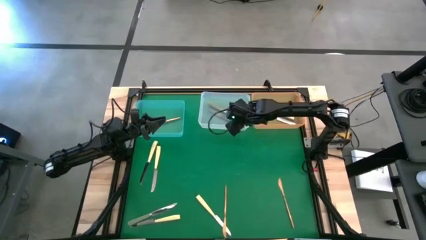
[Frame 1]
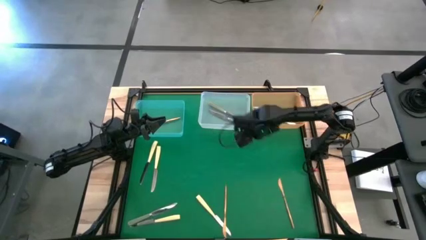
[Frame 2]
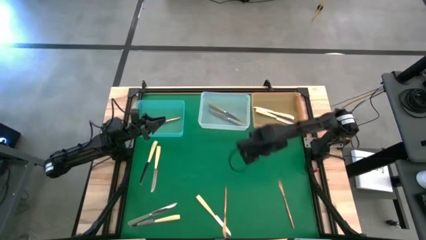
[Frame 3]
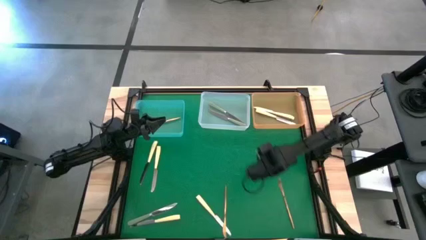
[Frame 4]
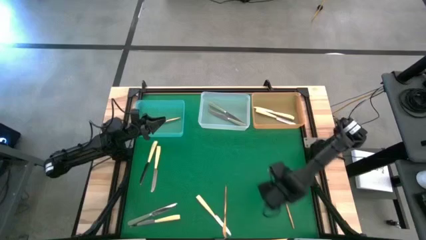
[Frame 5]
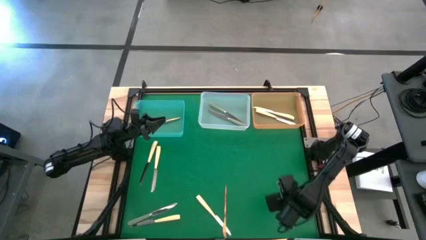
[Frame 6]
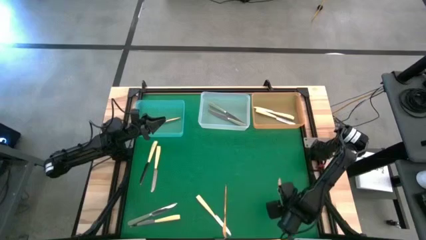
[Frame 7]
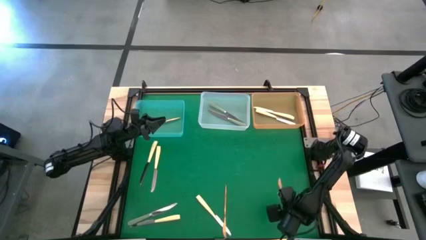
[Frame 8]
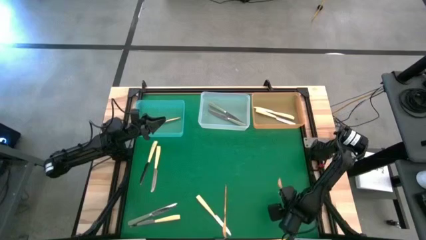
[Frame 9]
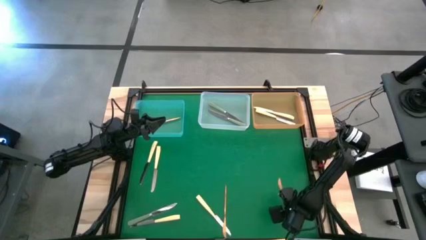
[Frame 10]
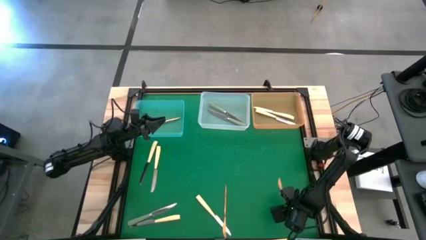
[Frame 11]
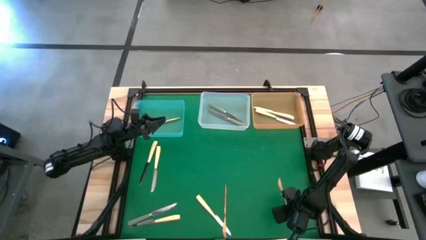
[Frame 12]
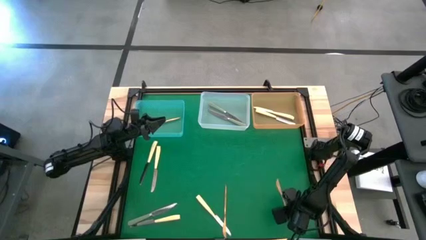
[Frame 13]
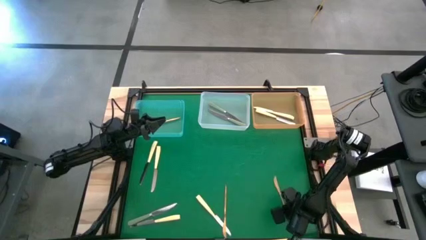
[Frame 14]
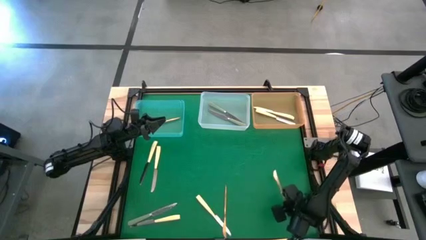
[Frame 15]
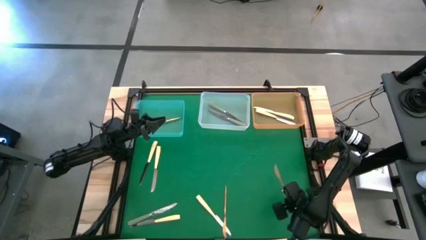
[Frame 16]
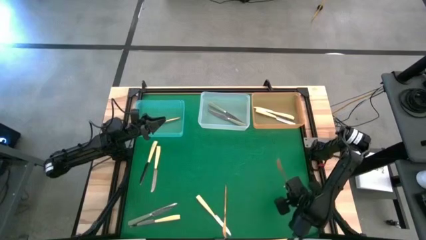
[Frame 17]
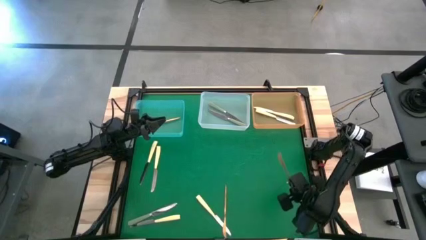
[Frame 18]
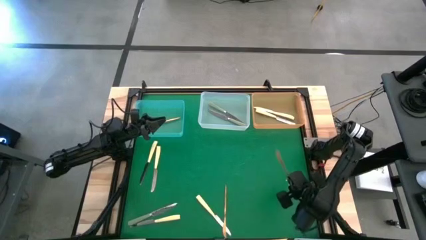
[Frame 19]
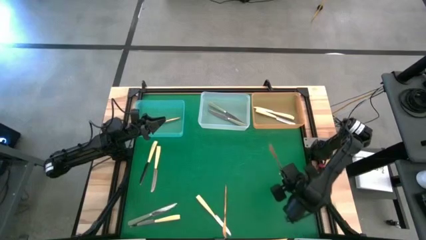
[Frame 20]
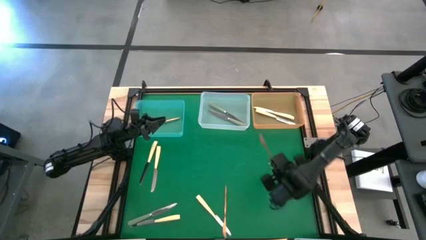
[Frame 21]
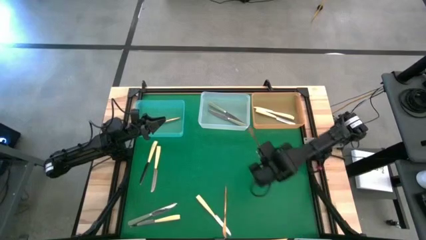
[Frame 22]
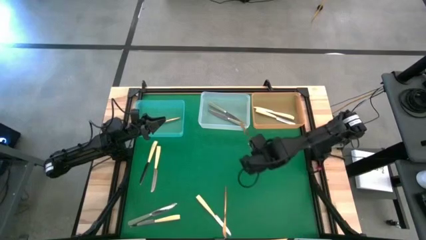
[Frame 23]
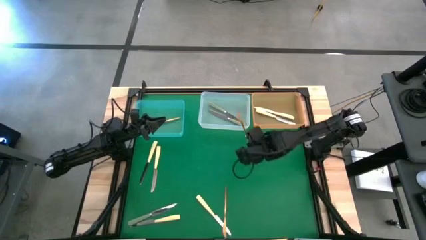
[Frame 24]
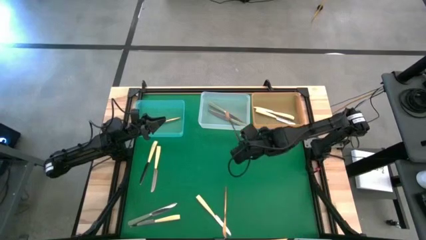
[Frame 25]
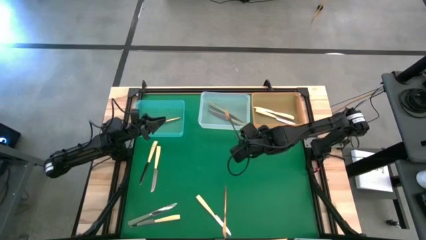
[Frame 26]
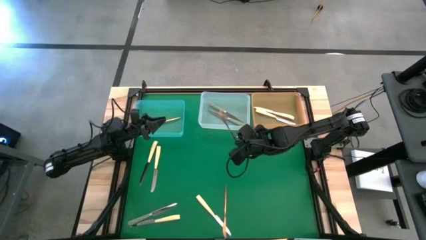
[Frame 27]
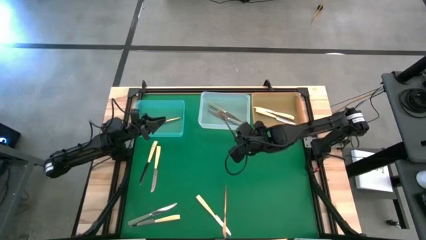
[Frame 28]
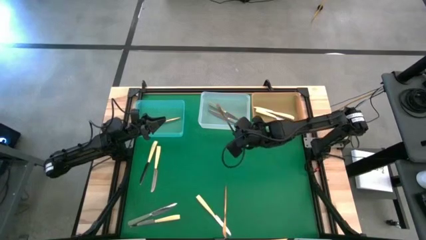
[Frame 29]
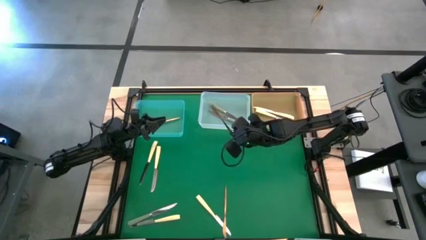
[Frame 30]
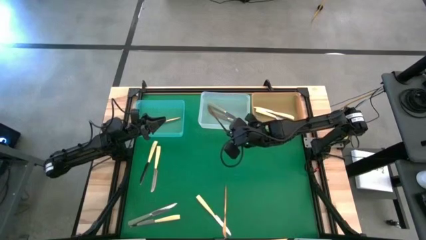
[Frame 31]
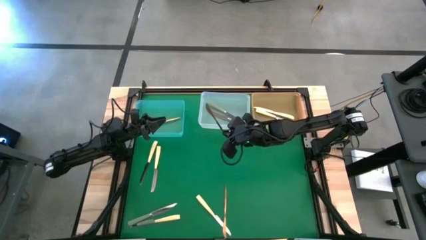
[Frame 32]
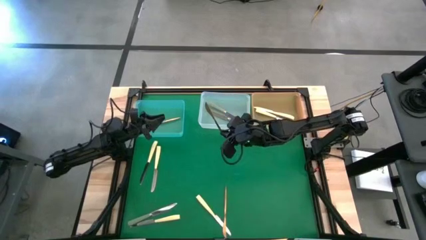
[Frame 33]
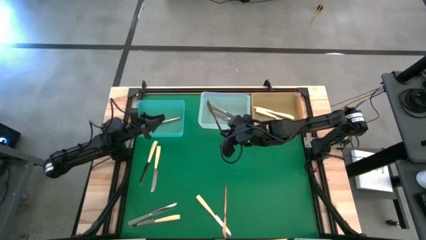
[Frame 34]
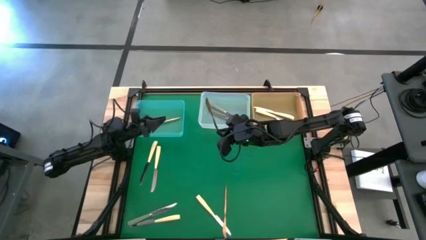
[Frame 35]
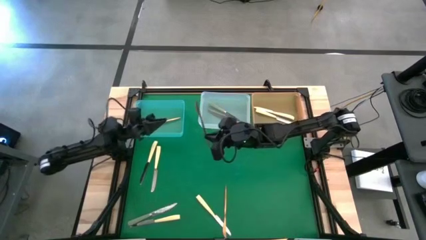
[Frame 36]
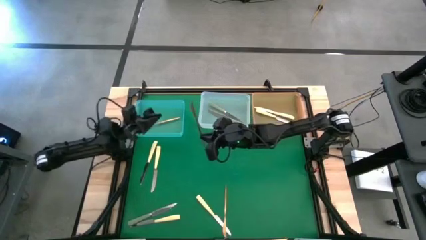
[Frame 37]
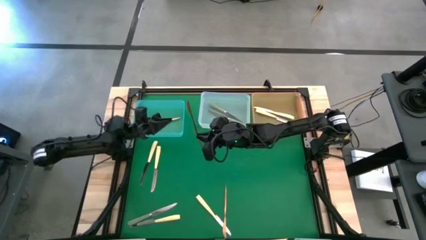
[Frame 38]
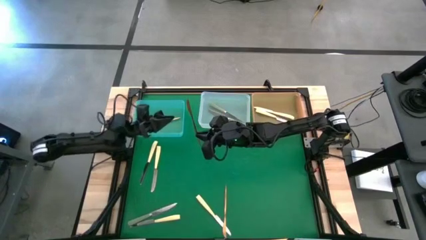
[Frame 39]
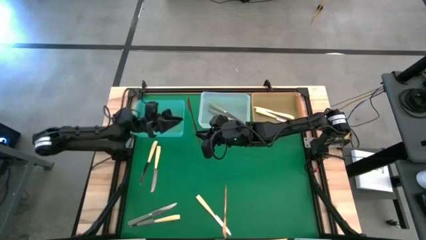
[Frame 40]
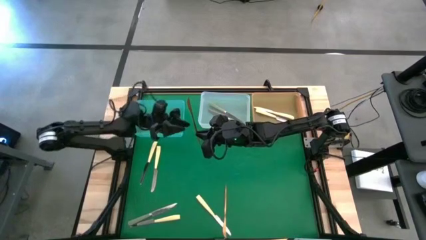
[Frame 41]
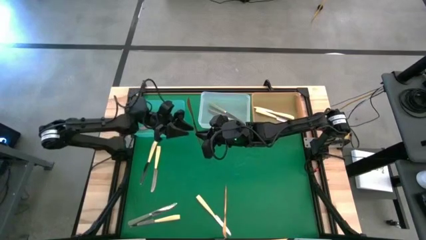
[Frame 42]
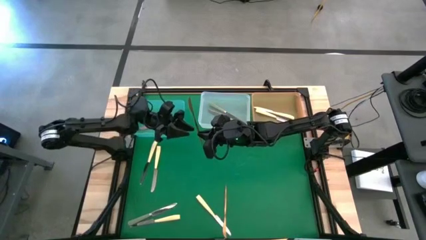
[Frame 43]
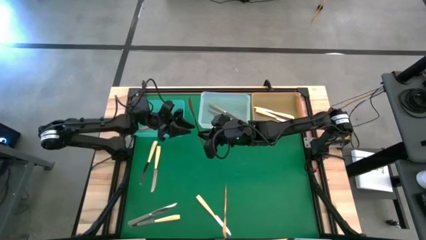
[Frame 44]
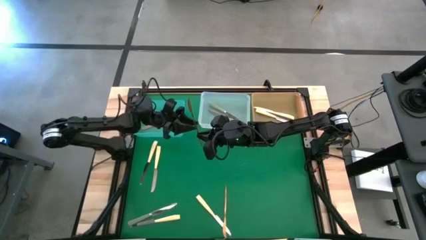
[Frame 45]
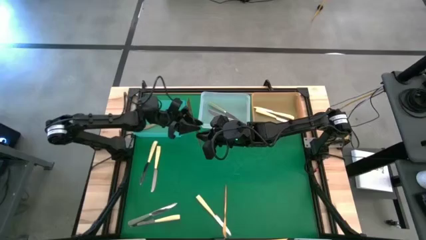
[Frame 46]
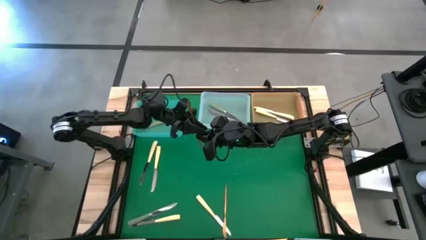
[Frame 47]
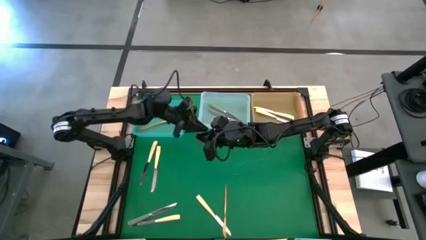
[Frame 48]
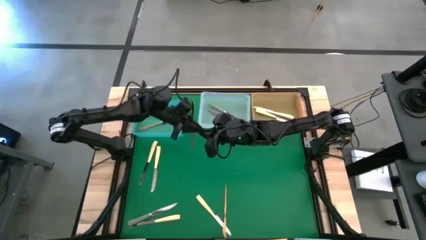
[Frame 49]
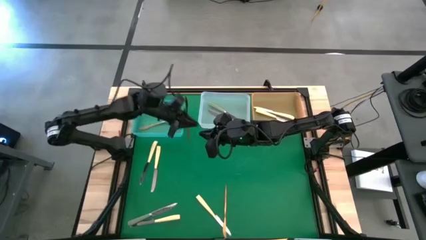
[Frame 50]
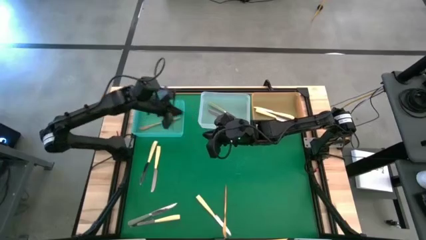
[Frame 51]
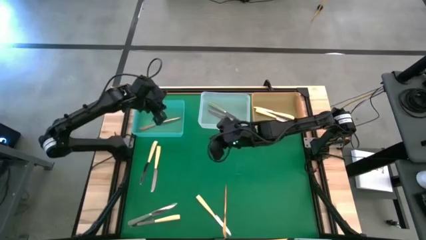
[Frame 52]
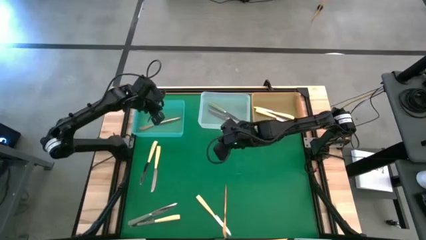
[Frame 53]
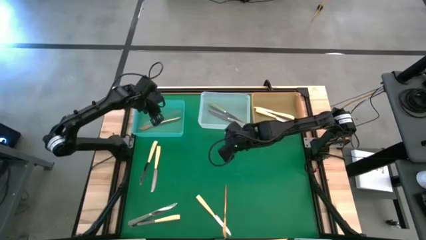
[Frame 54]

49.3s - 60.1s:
Task: Sort silverware by color (type)
Put the gold knife into the blue bin

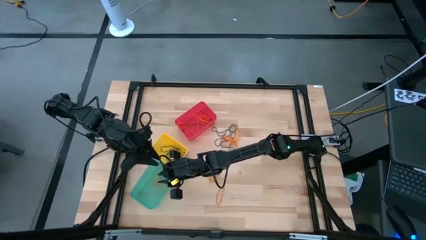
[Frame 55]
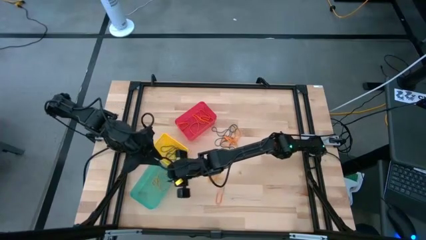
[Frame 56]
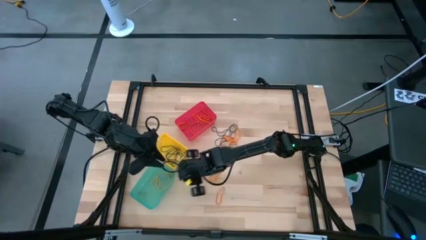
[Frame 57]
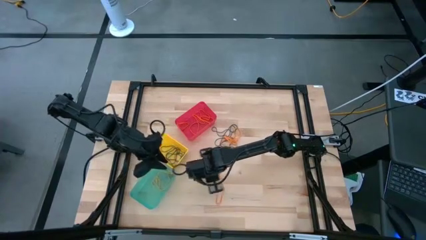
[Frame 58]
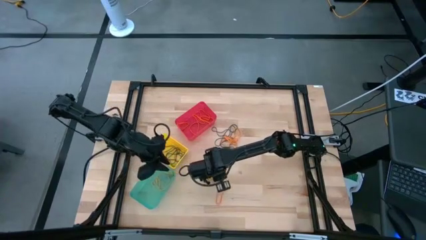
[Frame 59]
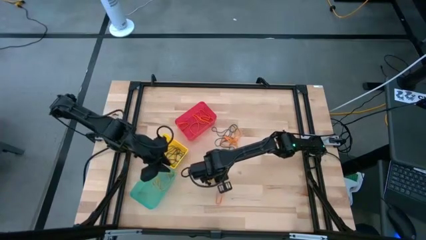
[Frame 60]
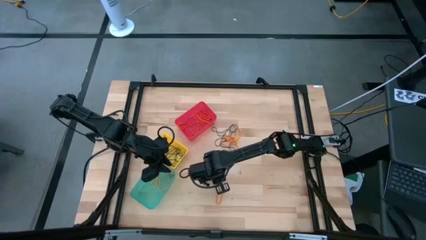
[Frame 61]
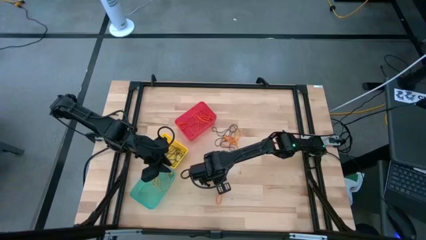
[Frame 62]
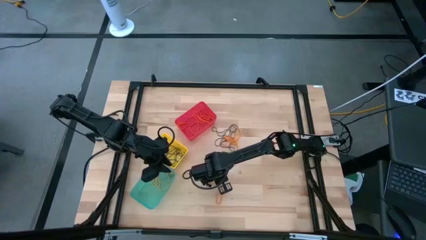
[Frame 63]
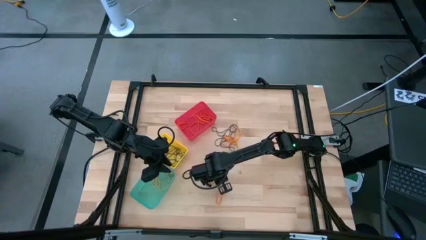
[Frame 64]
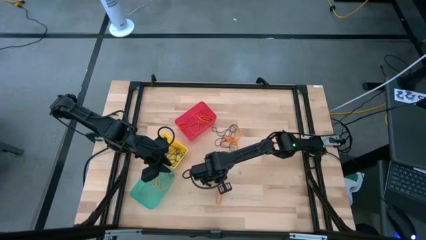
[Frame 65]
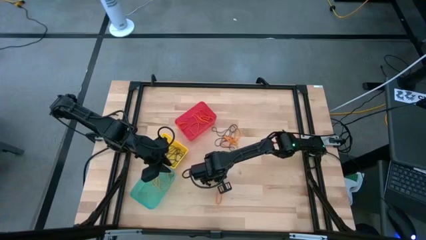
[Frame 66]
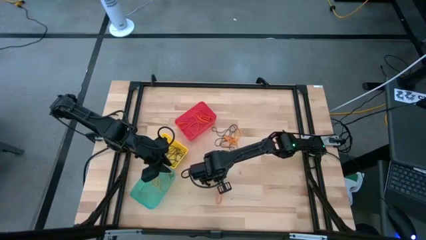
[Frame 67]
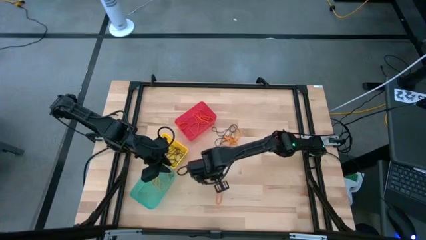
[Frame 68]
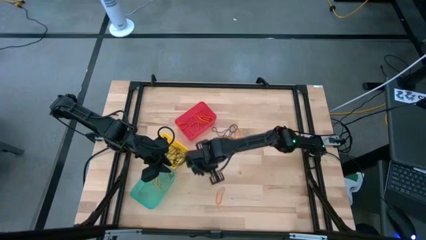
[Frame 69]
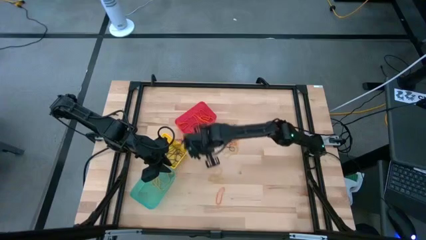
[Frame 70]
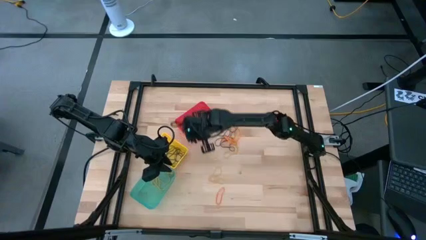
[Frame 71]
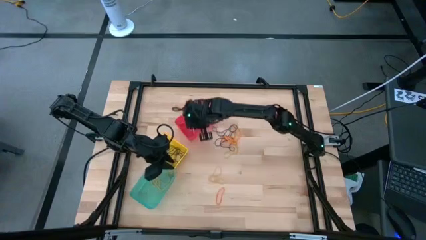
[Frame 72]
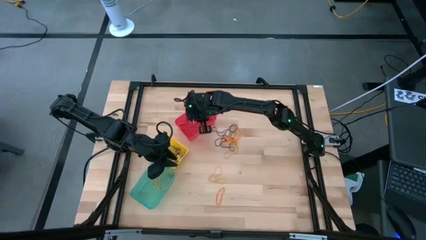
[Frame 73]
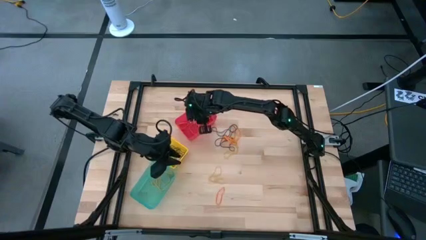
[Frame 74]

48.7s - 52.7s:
Task: Sort rubber bands into baskets
Put the orange rubber band into the red bin

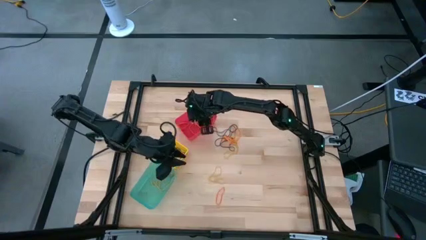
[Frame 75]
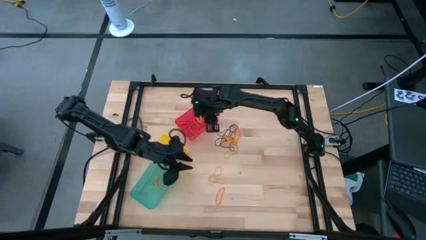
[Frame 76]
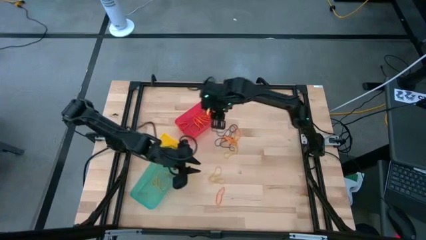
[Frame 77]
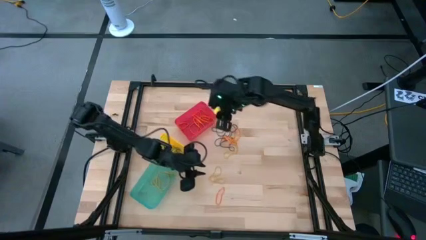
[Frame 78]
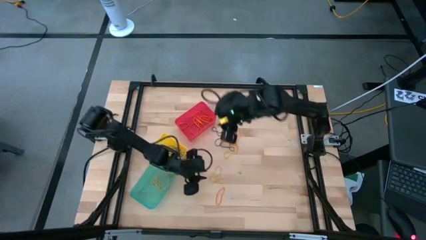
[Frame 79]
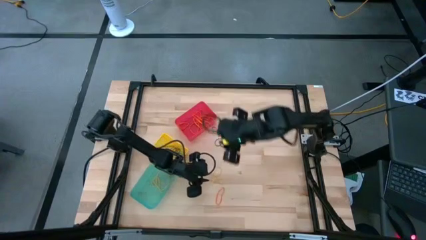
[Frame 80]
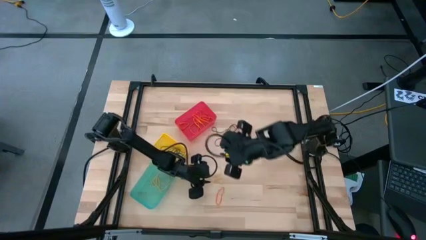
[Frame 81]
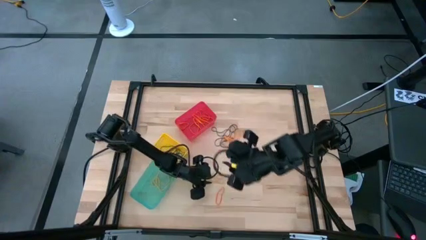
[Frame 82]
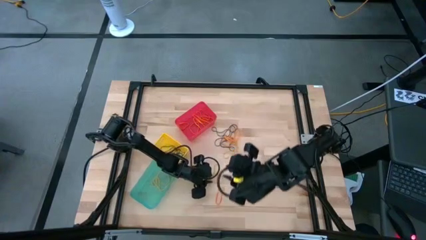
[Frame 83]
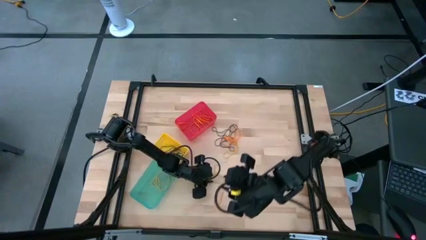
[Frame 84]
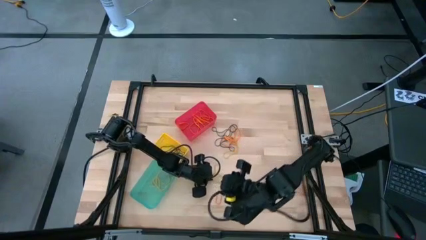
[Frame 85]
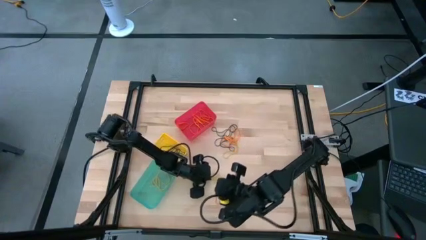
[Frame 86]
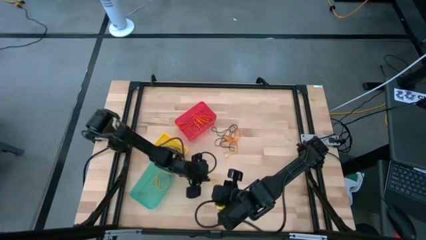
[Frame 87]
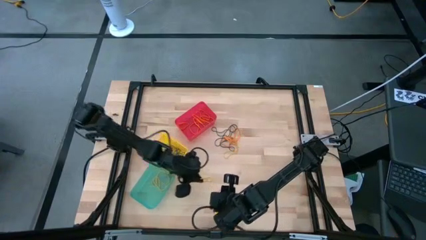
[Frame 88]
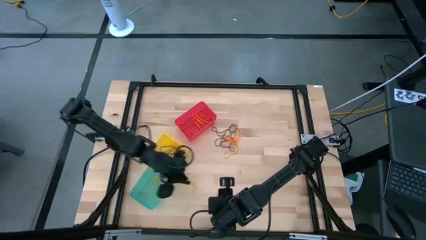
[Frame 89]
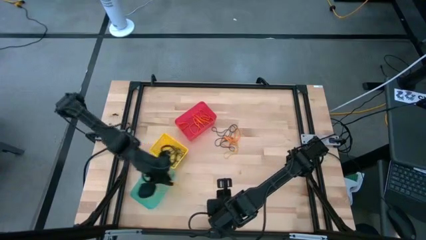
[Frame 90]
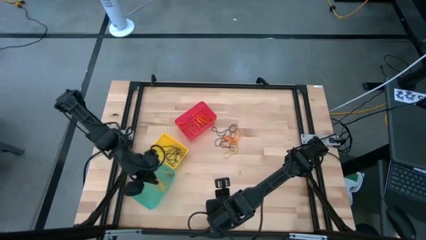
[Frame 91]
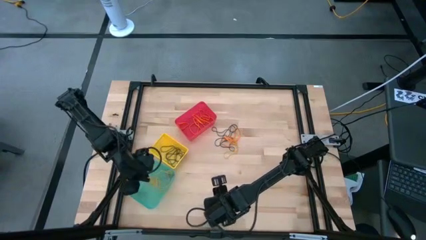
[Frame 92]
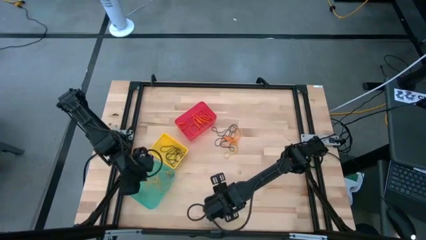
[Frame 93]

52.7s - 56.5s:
Put the yellow rubber band into the light blue bin
